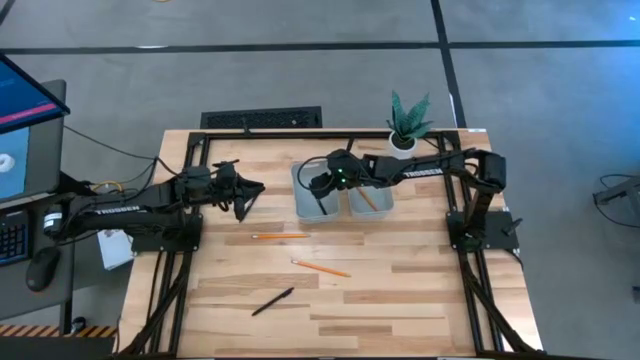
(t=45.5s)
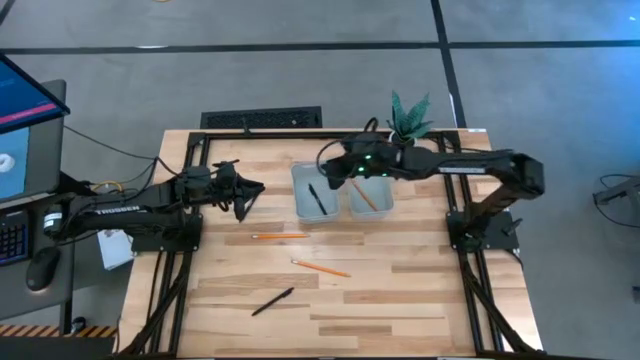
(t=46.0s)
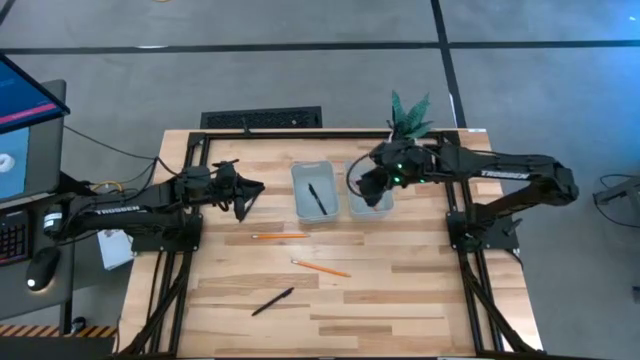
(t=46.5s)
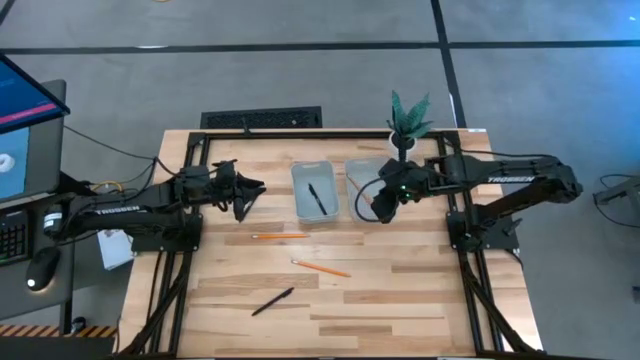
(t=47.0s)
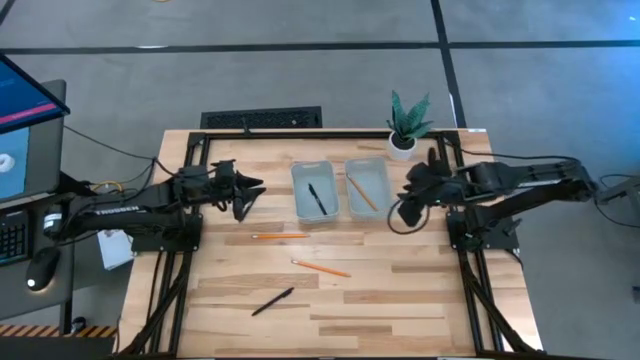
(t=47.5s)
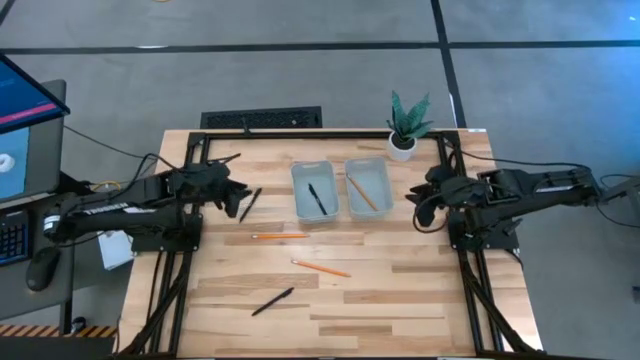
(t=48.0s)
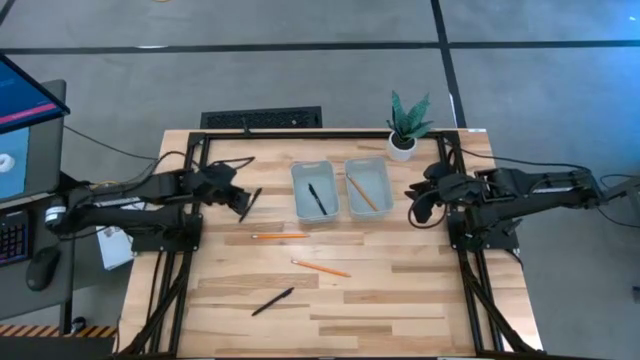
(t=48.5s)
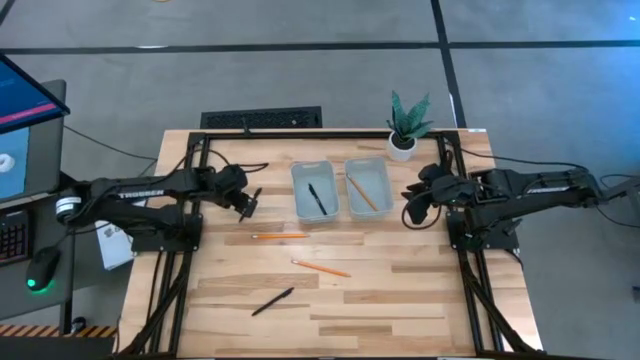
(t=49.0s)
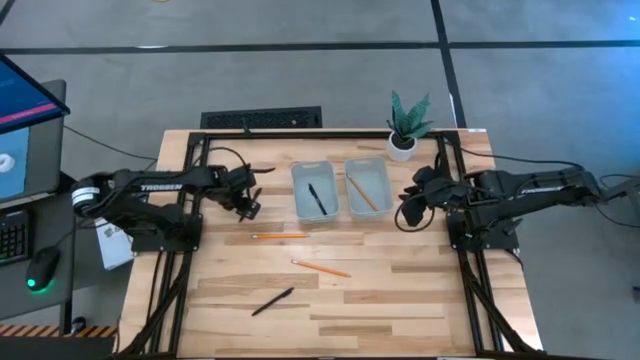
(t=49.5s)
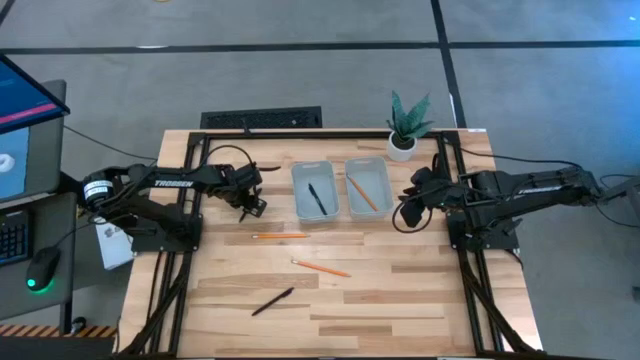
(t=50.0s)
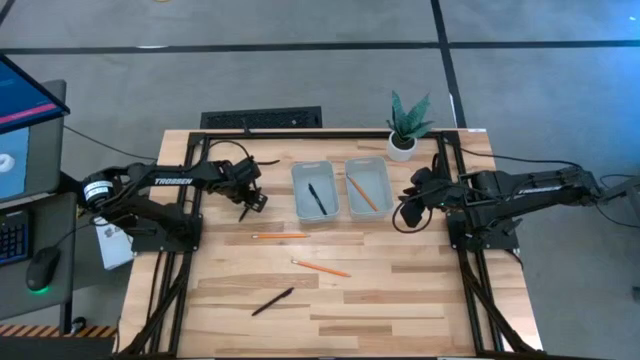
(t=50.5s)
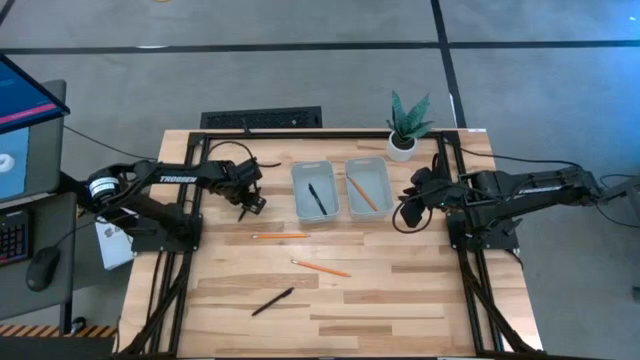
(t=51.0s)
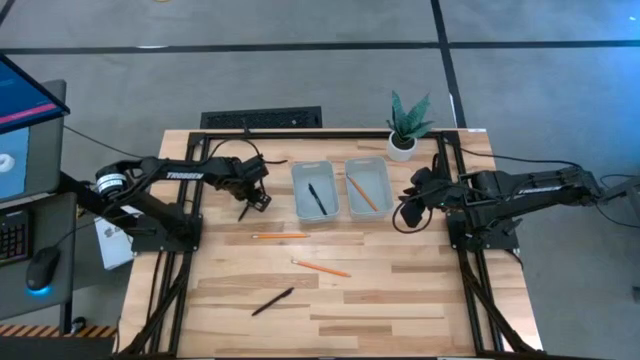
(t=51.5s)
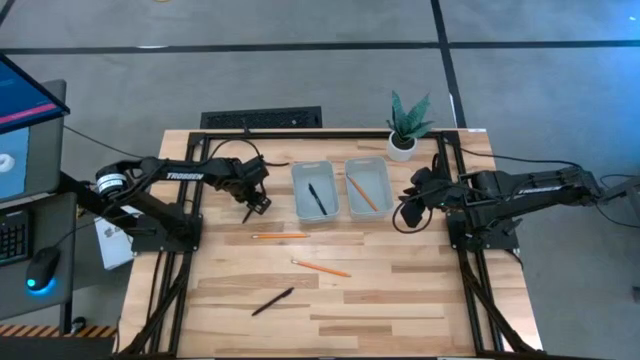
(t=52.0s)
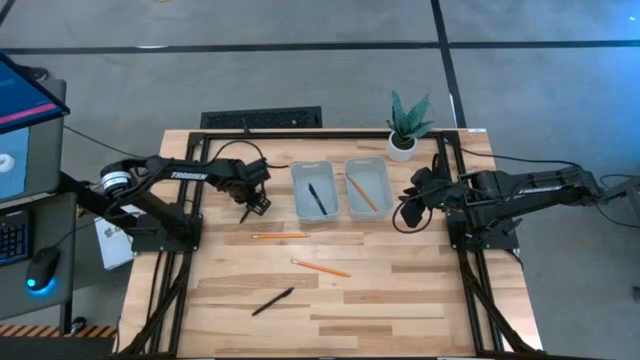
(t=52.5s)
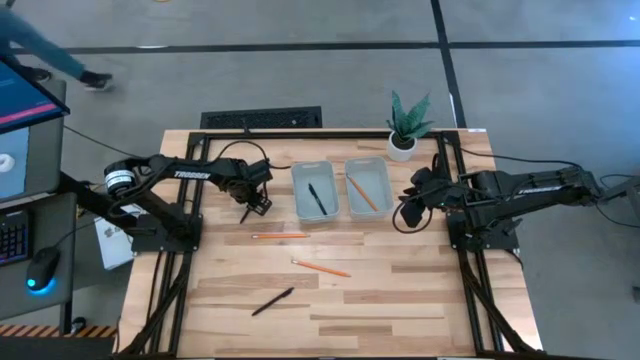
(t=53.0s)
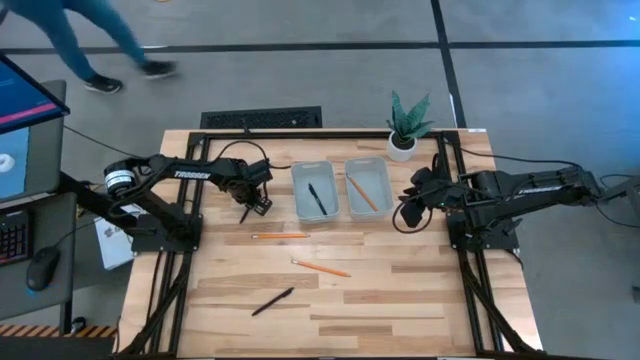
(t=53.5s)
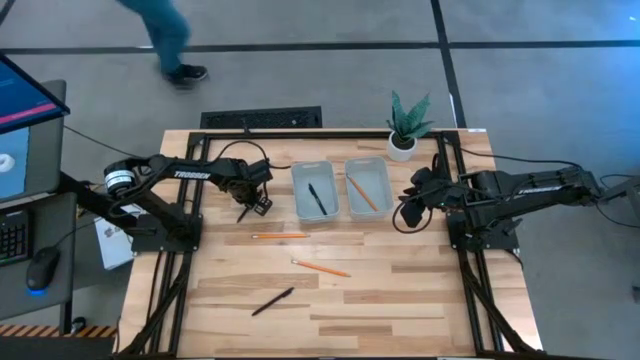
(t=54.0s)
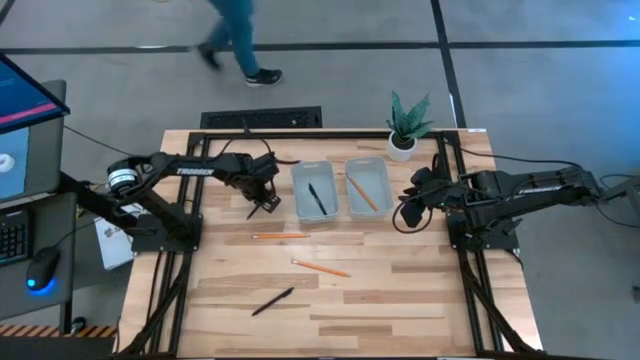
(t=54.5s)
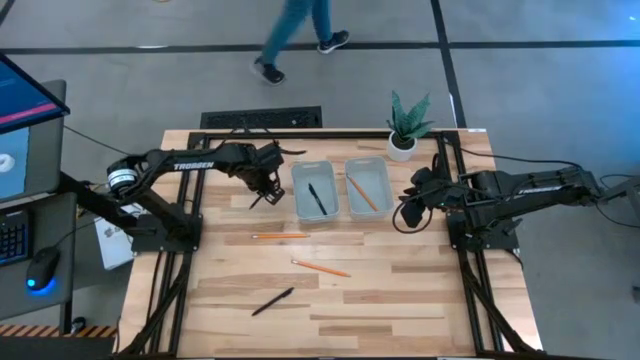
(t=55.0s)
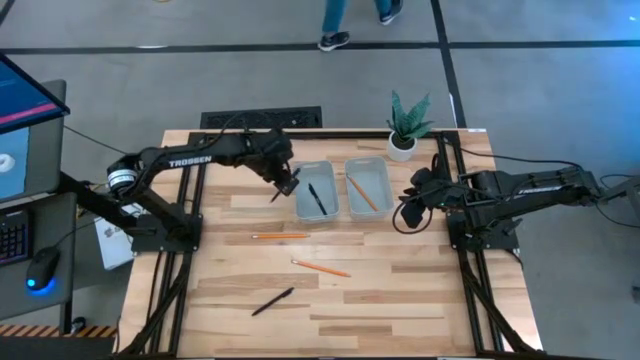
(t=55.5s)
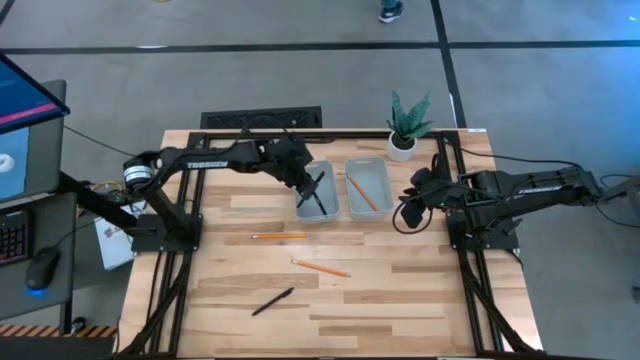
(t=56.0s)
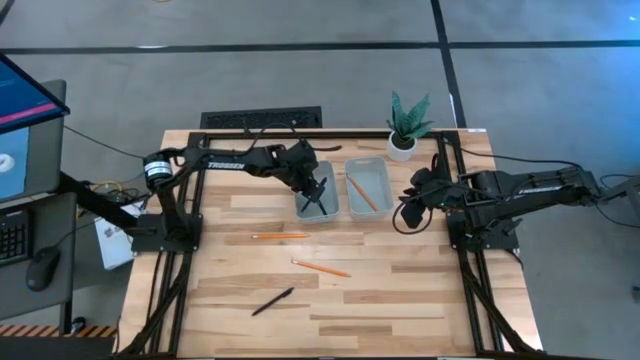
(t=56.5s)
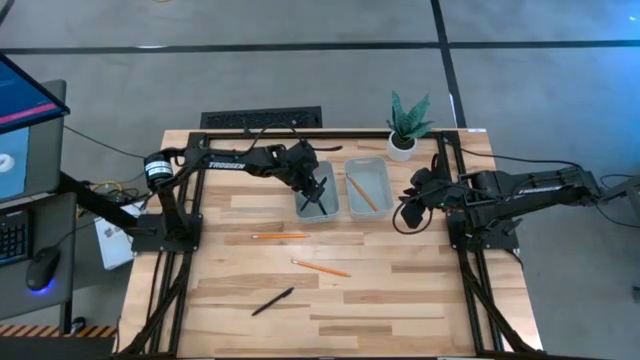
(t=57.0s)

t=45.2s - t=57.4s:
Task: Sort pens & pencils
Put the top black pen into the left gray bin

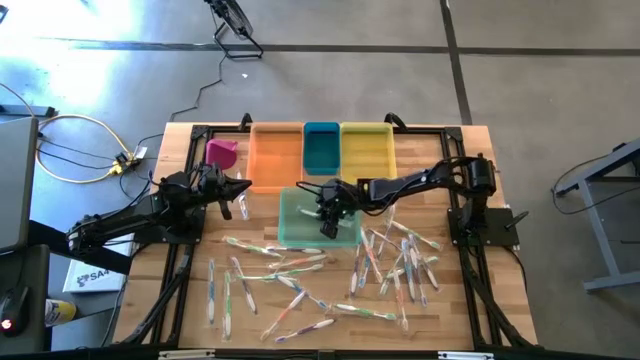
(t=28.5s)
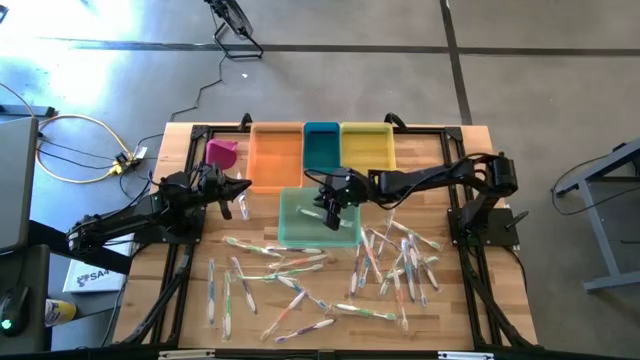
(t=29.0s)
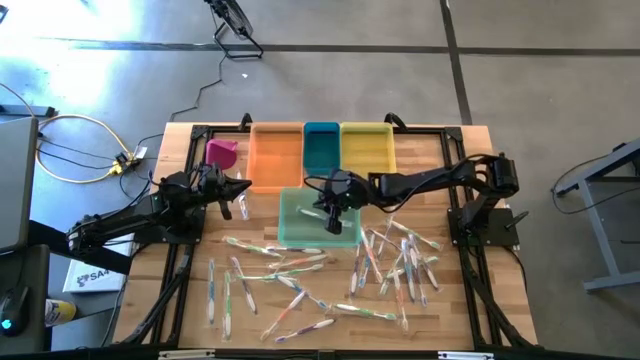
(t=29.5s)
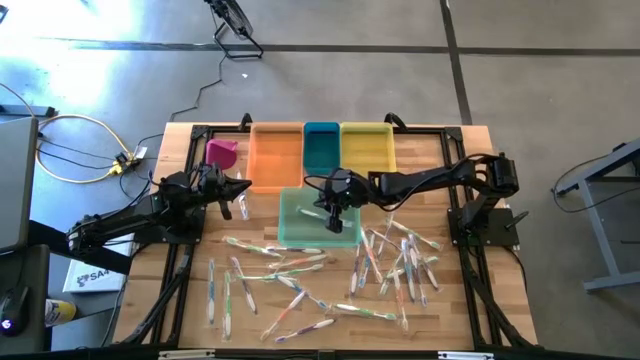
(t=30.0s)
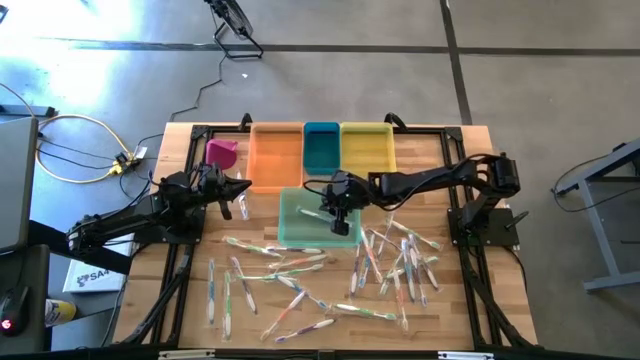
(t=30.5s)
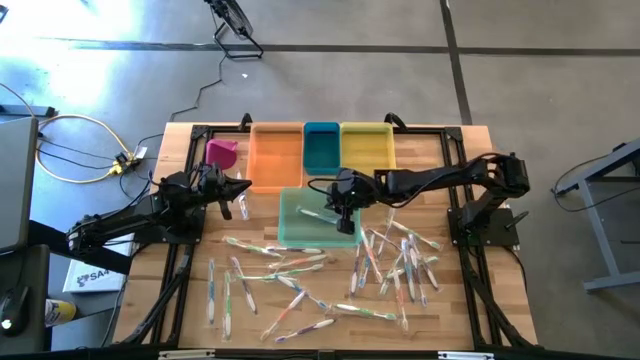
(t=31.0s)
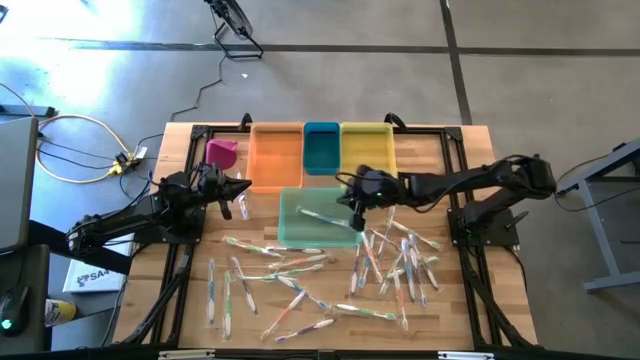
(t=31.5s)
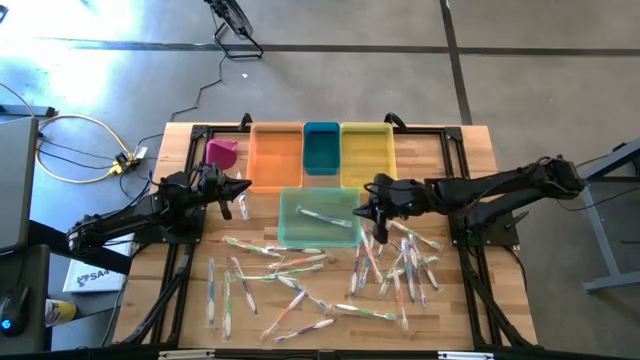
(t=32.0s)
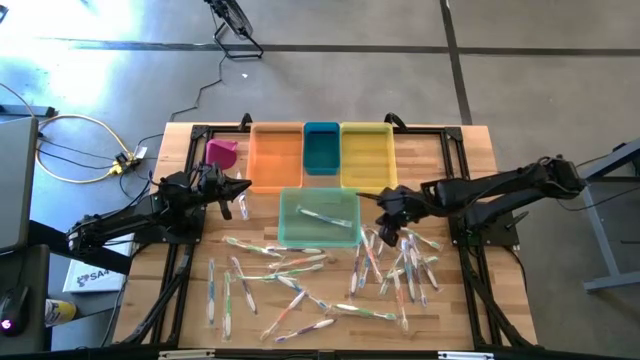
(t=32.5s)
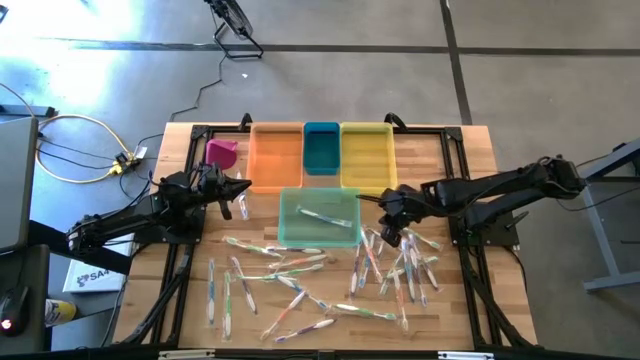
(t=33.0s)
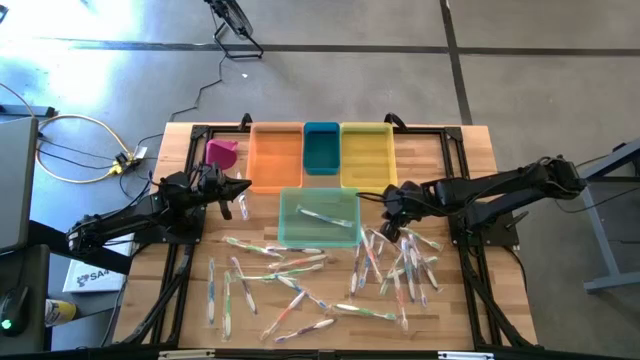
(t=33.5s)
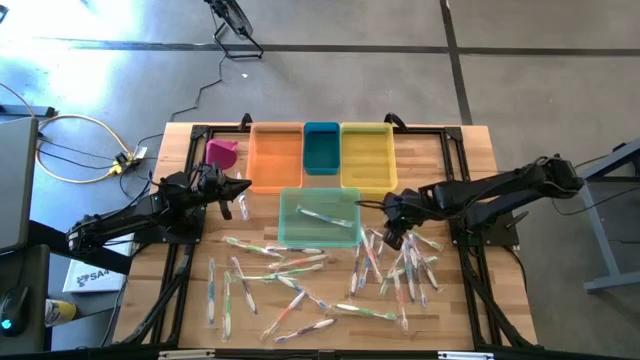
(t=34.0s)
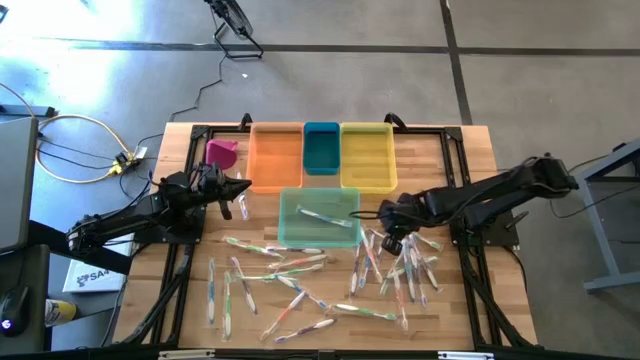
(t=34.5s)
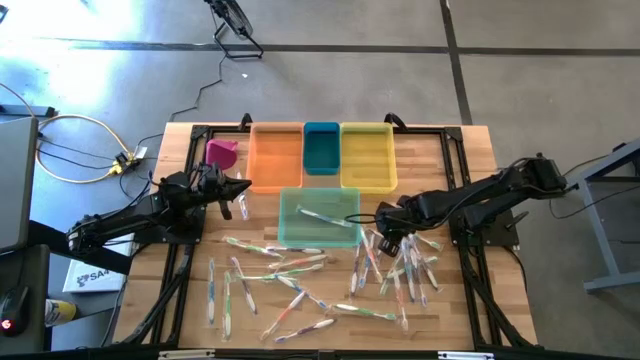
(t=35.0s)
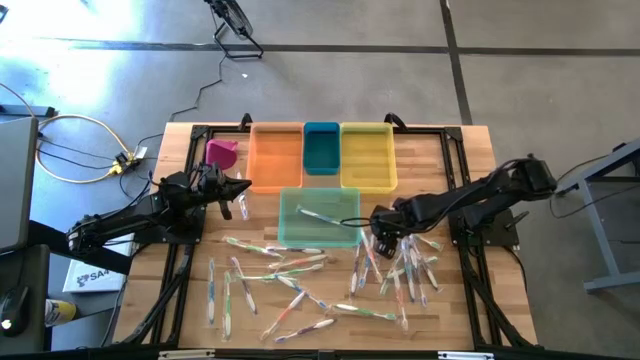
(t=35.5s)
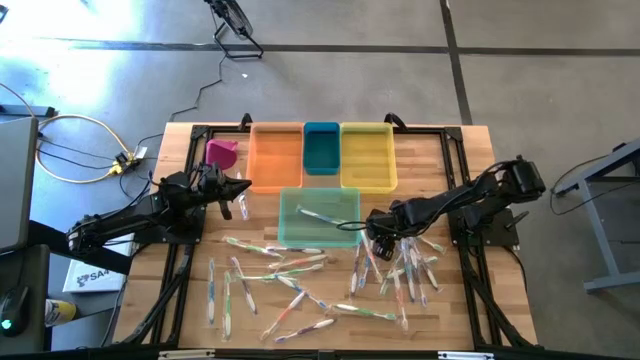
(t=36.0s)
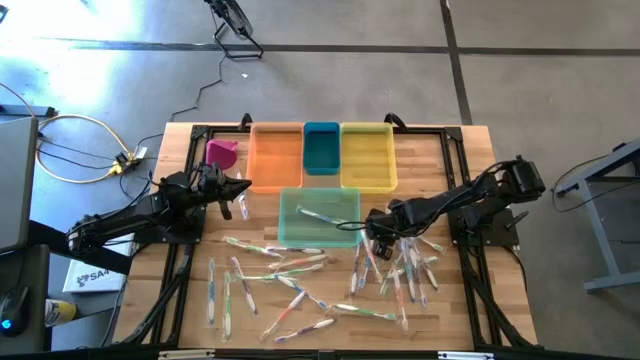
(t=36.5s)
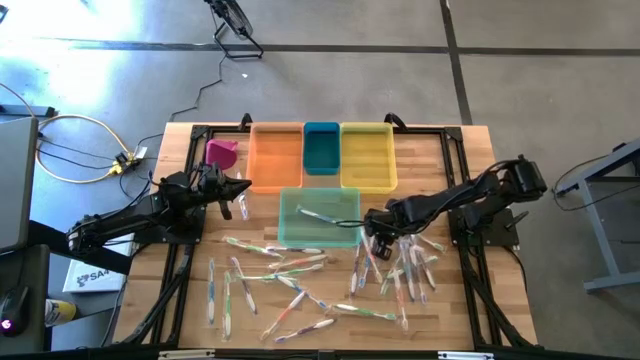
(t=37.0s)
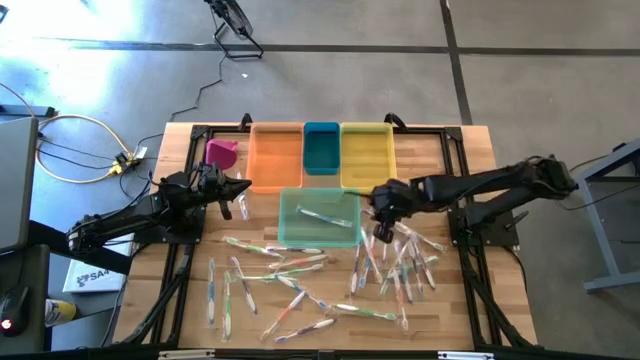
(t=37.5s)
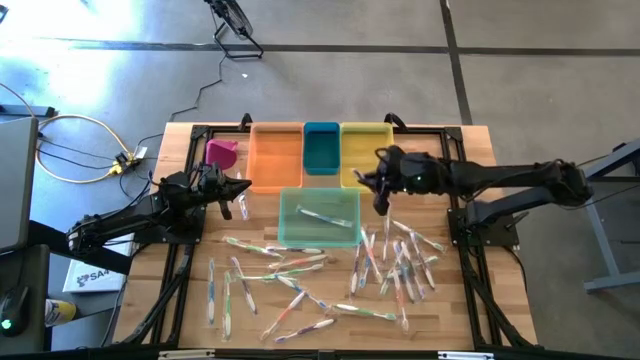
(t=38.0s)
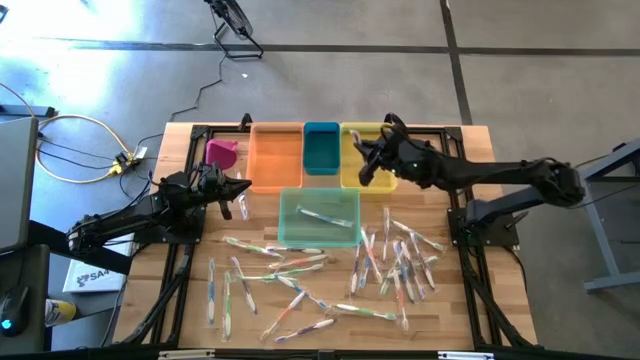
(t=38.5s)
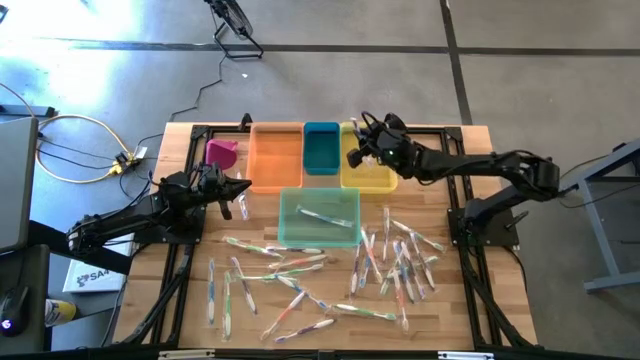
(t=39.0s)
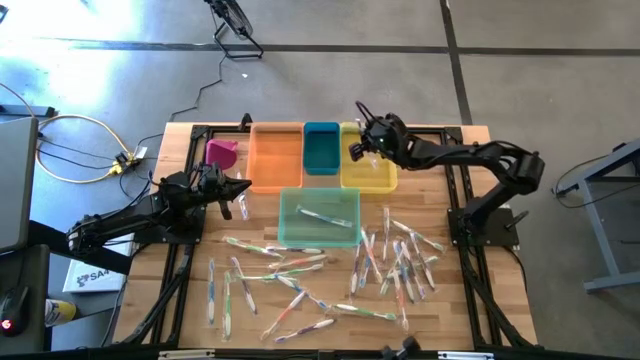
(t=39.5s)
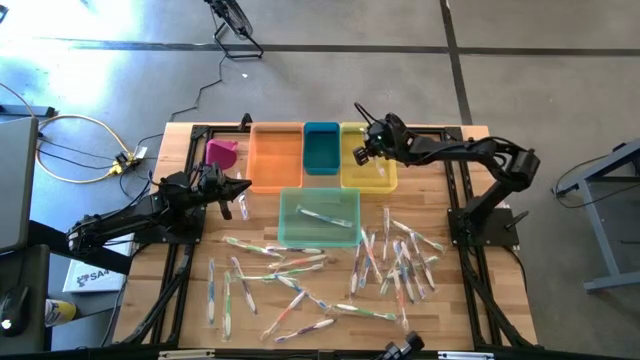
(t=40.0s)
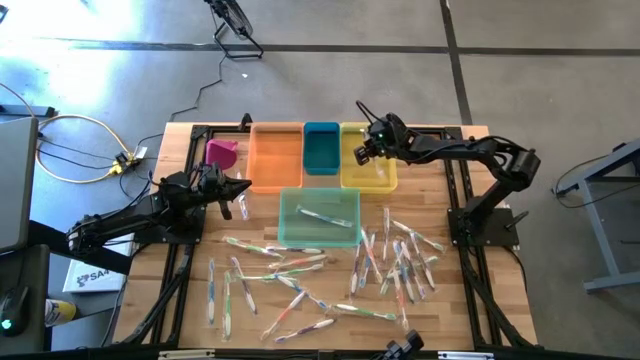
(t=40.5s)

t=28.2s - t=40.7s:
Task: Pick & Place Toothbrushes
Put the purple toothbrush into the yellow bin
